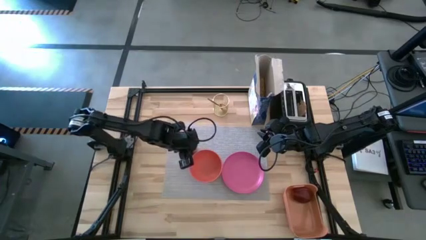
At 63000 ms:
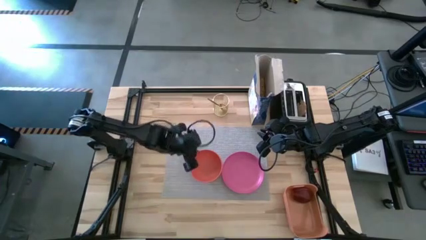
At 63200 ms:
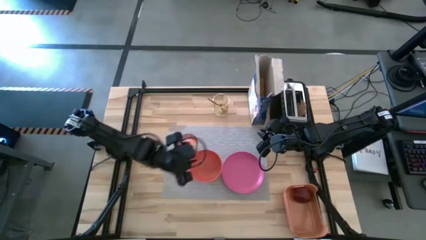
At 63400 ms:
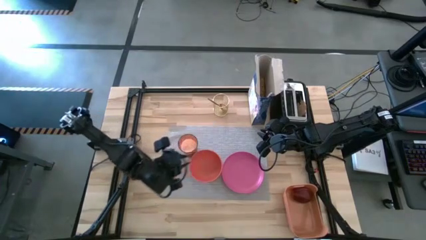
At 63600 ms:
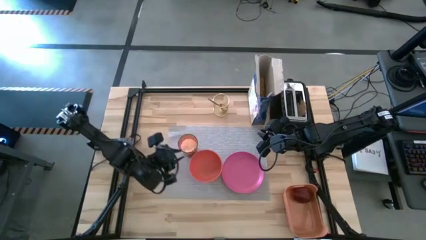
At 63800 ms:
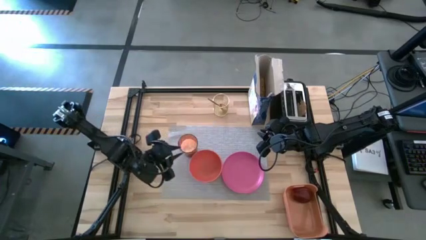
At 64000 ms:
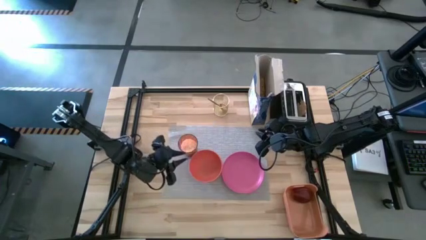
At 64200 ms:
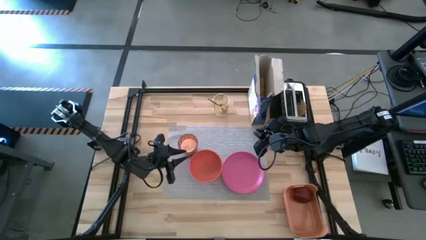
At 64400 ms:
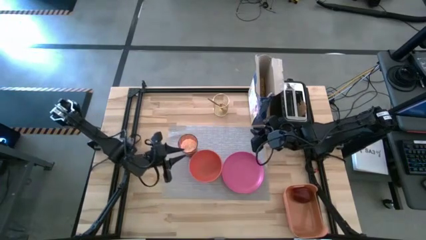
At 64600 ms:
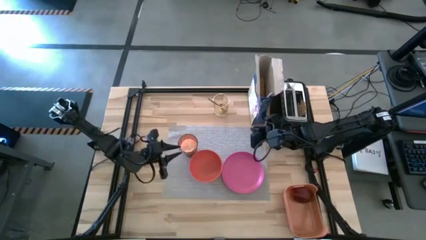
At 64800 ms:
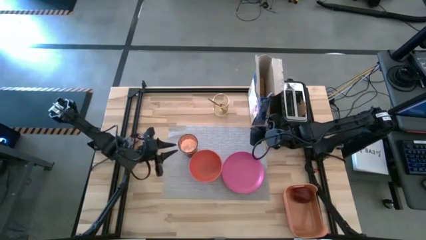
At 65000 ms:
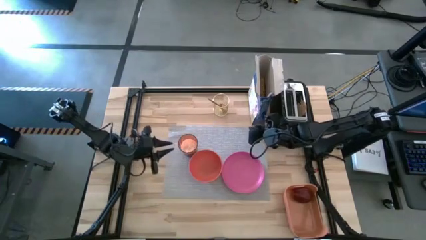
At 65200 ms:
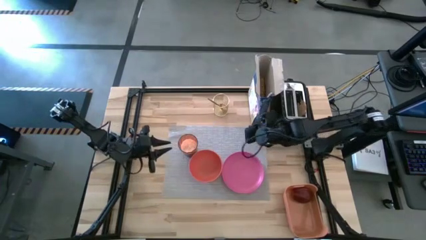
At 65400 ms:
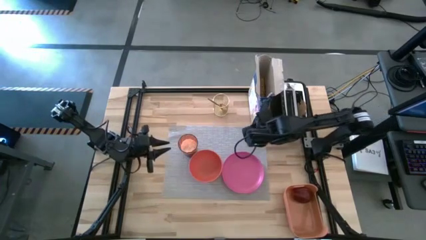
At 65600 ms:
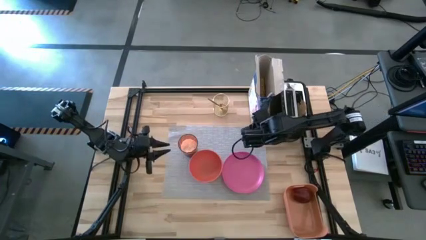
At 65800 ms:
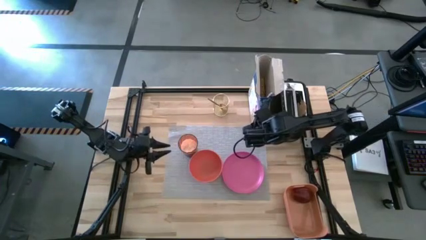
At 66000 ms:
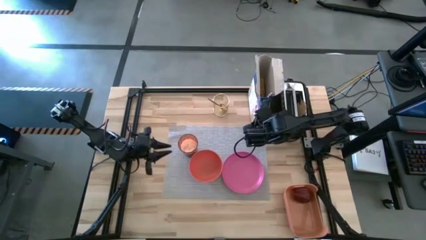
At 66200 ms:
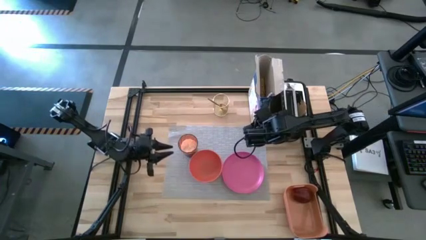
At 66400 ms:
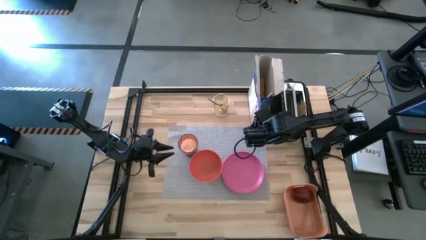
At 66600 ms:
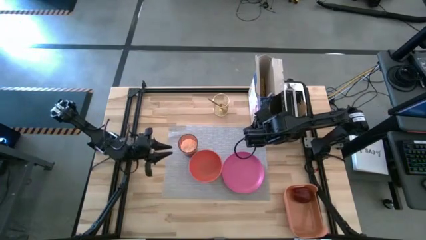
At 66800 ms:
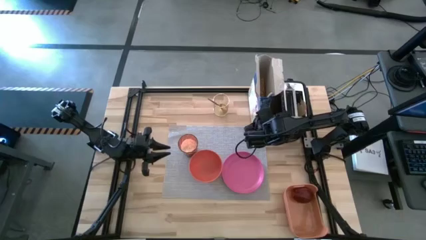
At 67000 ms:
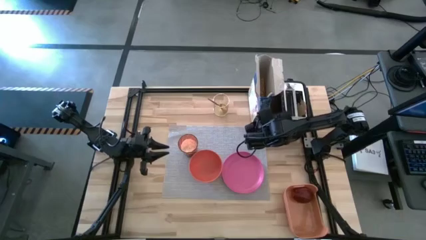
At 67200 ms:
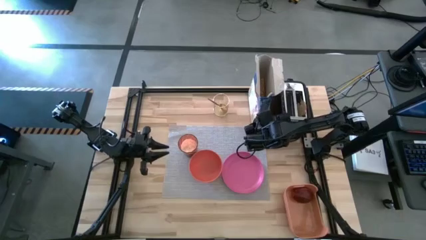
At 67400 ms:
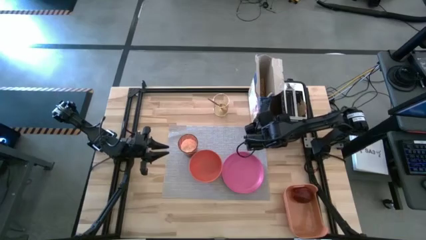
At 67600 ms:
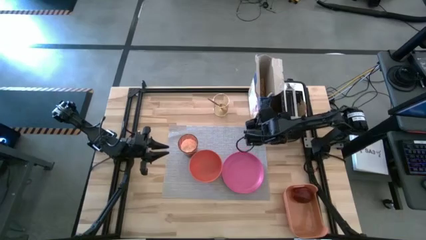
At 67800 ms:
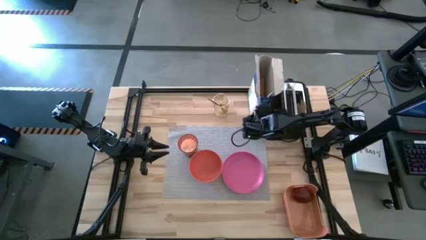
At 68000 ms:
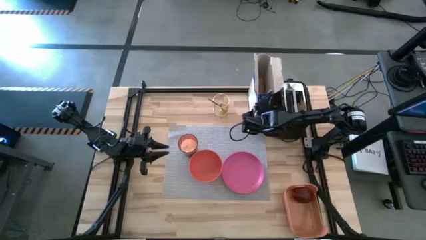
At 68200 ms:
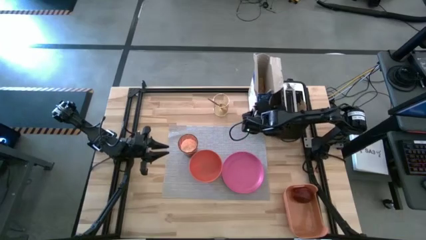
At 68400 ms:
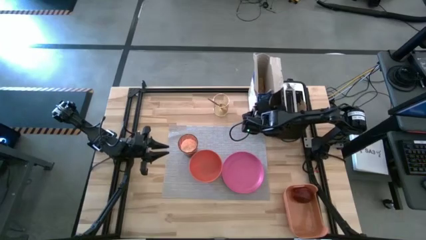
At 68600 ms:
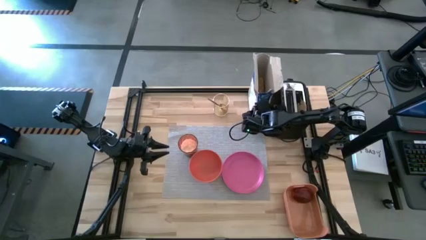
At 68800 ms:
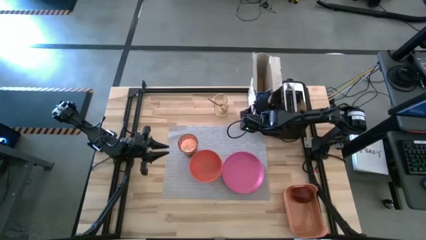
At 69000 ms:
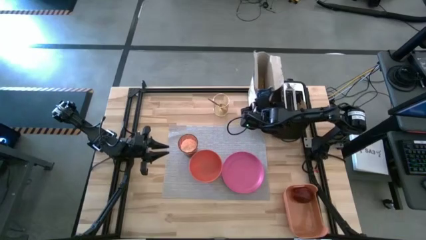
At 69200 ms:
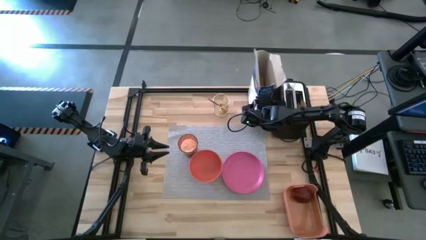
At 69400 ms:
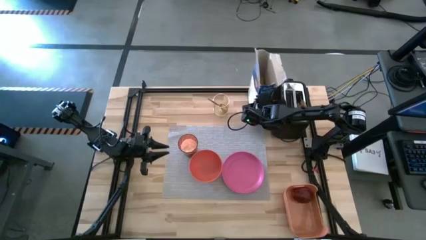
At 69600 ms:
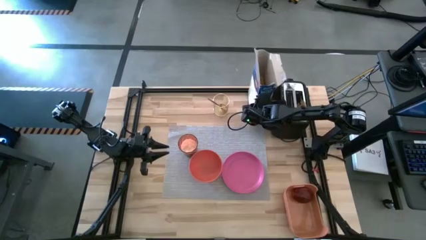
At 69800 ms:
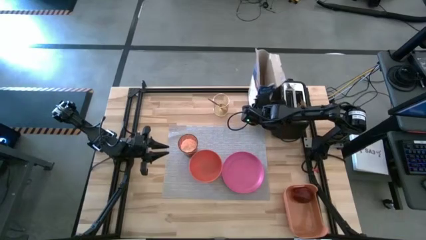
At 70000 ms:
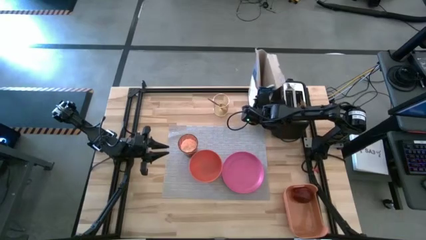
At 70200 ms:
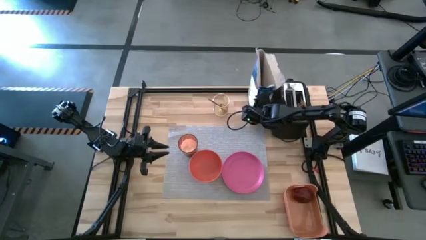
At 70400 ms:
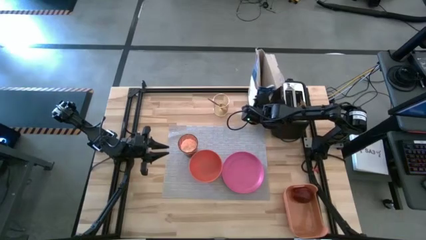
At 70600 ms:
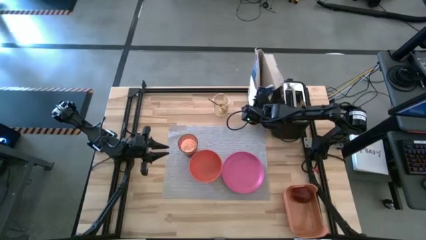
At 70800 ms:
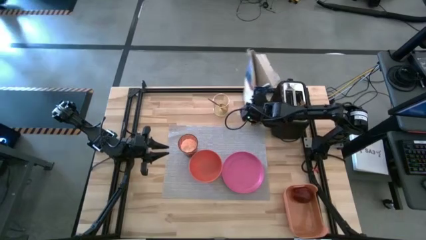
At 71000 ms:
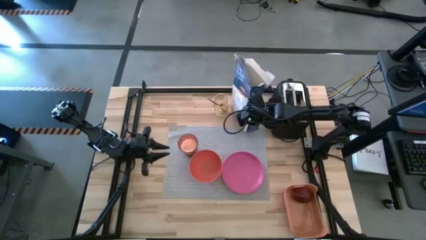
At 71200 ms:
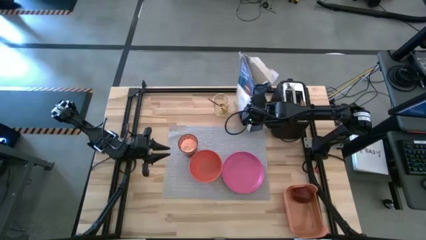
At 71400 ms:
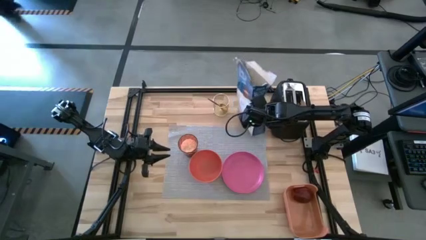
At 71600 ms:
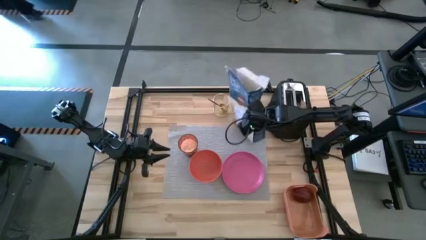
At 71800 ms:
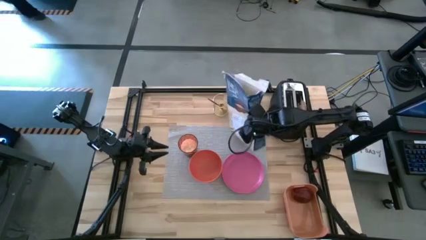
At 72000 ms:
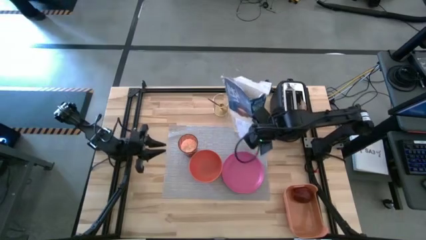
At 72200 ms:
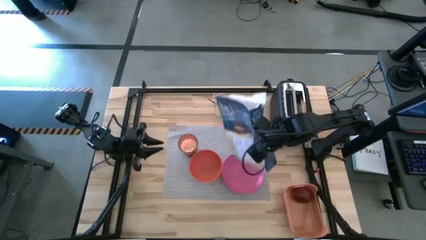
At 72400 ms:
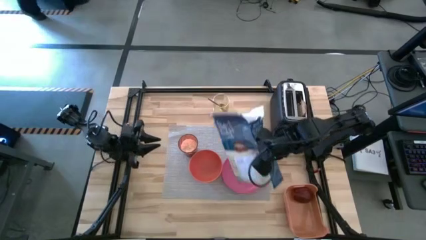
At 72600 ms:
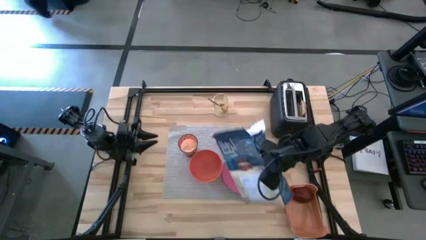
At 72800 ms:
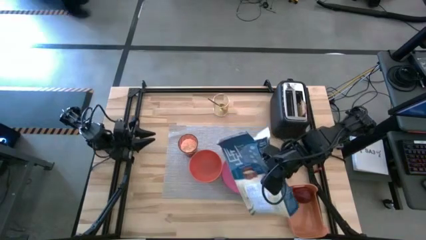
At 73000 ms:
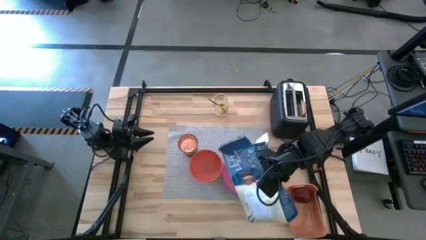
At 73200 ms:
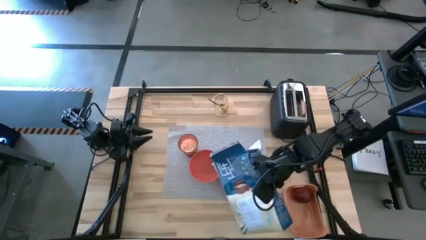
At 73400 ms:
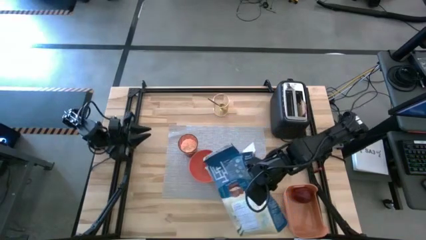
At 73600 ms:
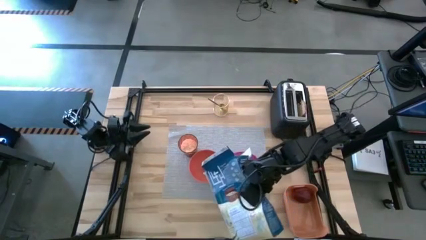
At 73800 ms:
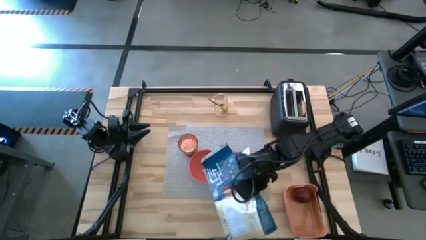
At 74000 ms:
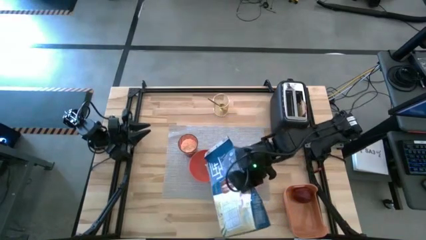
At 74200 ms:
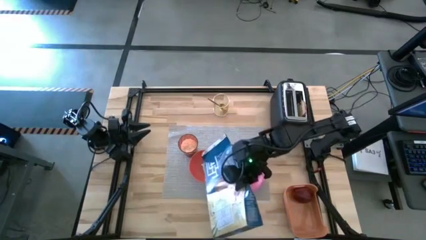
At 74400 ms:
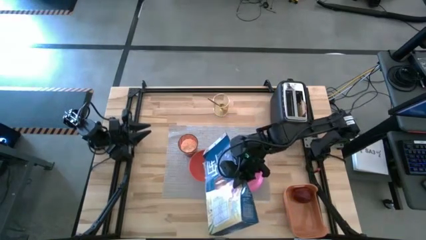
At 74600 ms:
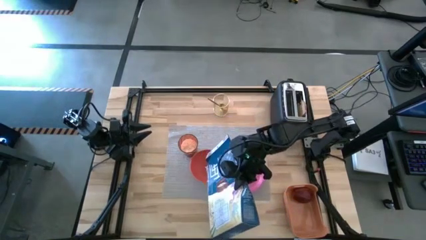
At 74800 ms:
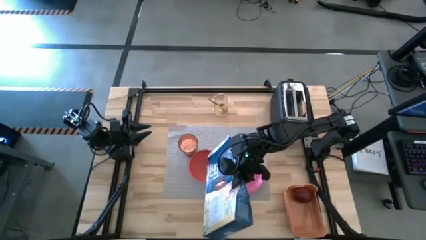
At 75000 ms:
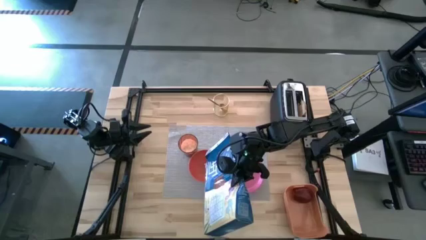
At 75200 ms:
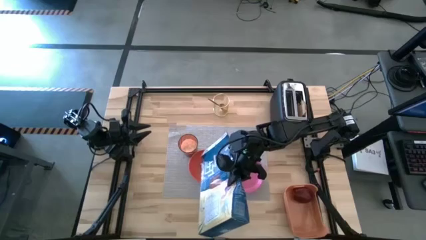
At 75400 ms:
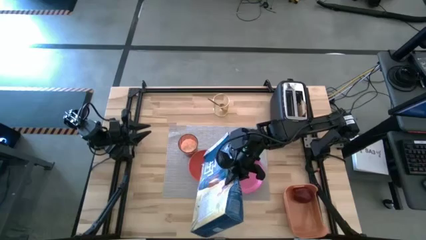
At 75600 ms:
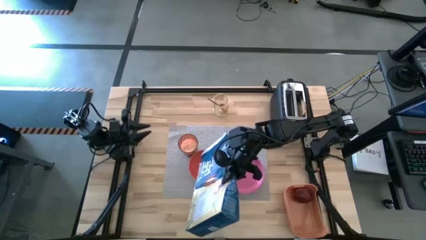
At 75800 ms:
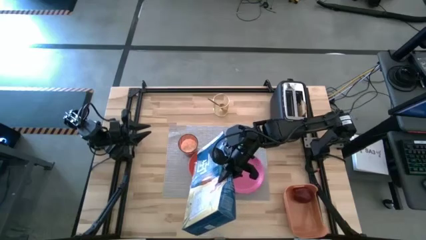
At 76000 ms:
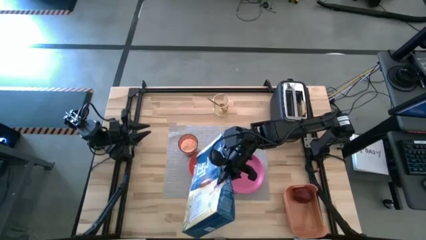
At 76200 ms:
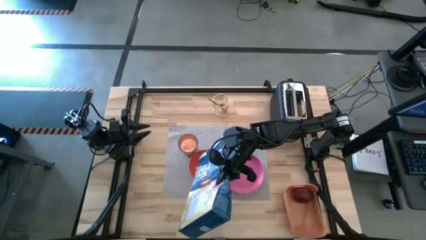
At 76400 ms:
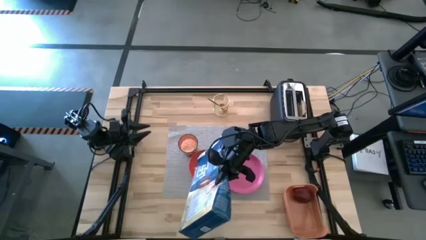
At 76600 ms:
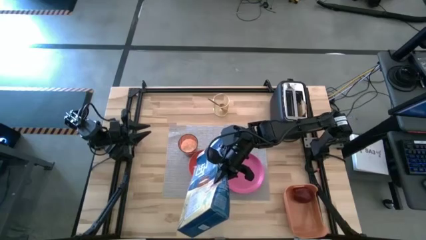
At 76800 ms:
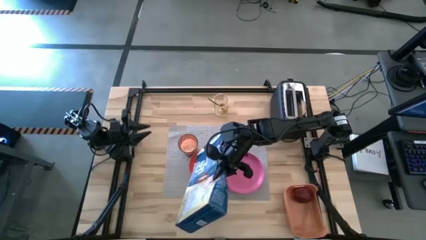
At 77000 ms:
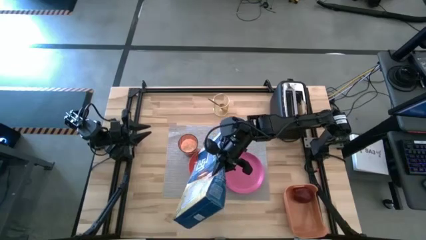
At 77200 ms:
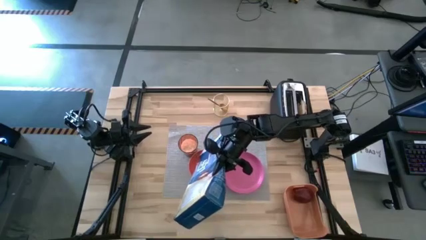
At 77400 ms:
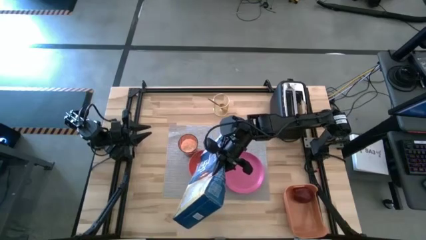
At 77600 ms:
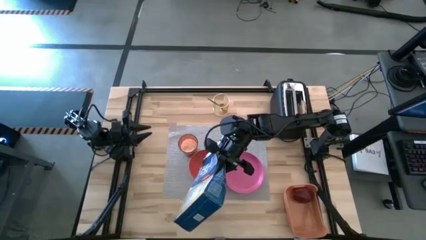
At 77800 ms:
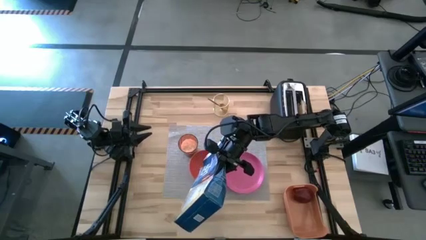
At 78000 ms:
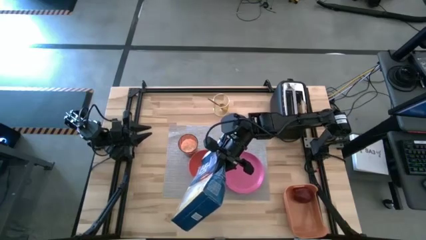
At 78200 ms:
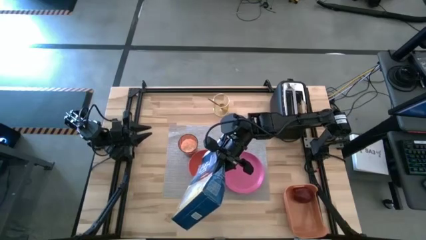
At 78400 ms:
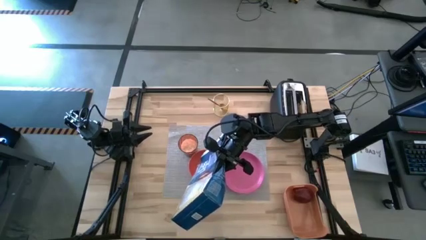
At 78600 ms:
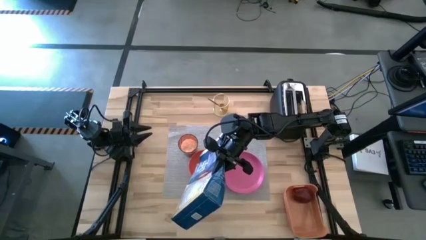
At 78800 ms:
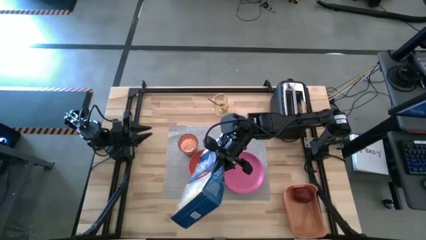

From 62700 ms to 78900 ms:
Task: Arrange a breakfast setting
Pour the cereals from the blue cereal box into the orange bowl
